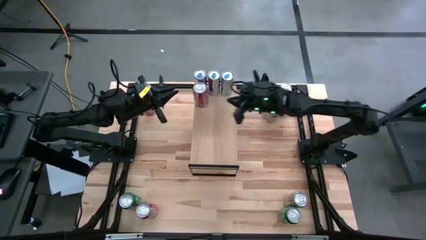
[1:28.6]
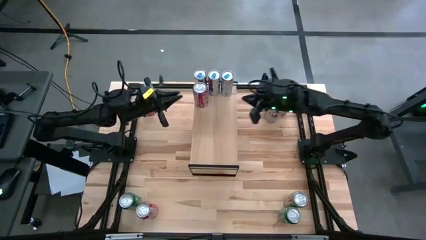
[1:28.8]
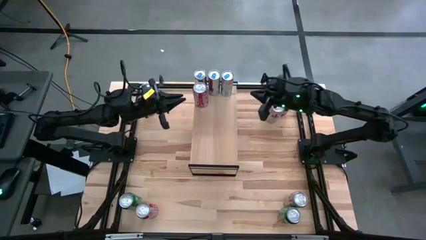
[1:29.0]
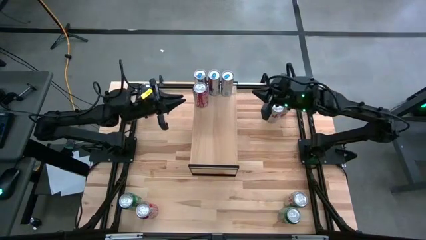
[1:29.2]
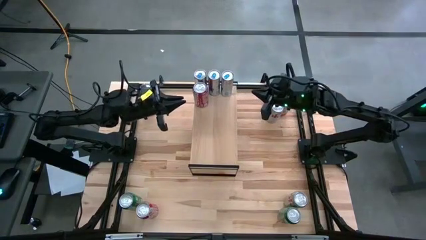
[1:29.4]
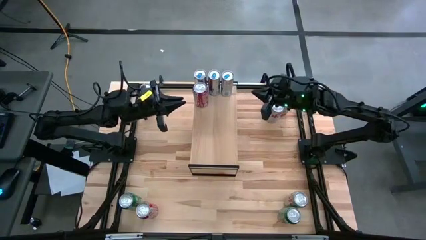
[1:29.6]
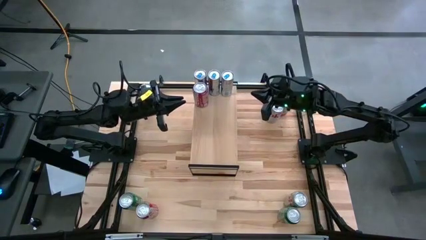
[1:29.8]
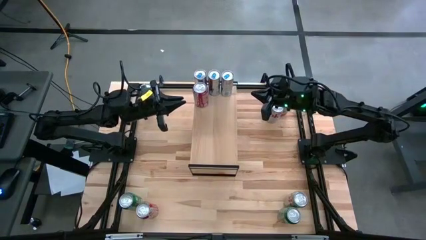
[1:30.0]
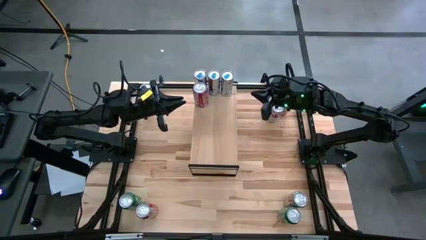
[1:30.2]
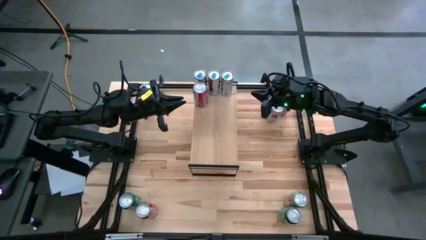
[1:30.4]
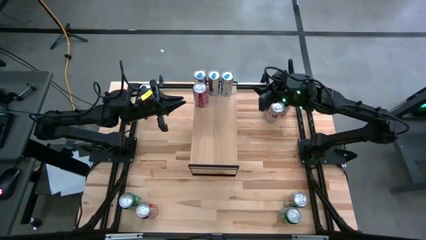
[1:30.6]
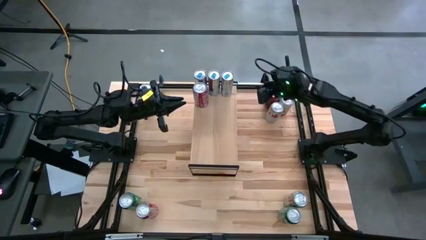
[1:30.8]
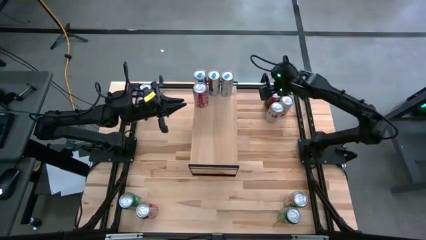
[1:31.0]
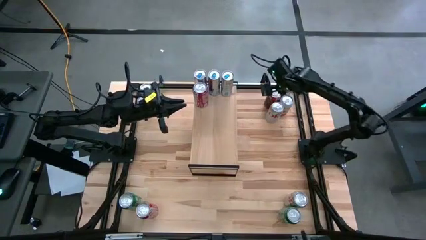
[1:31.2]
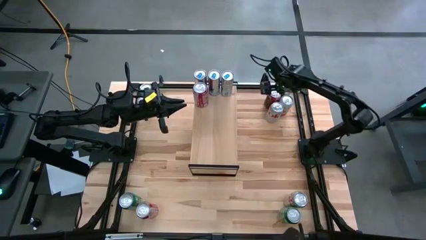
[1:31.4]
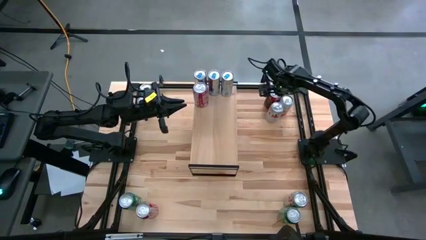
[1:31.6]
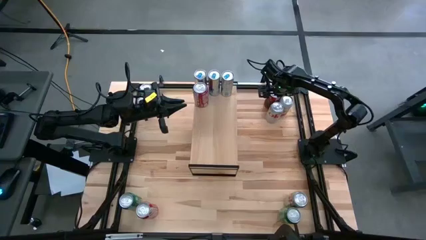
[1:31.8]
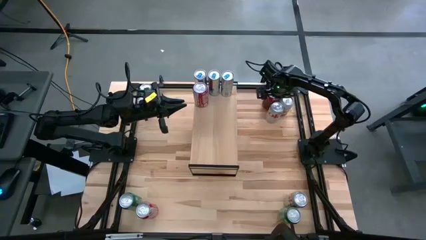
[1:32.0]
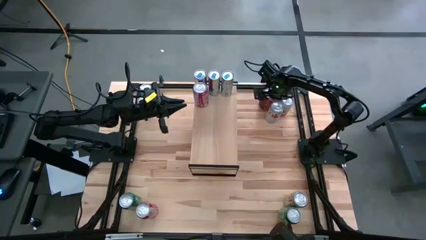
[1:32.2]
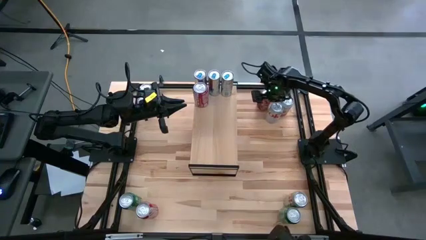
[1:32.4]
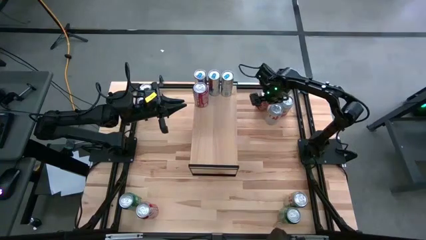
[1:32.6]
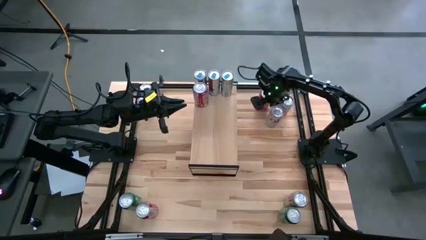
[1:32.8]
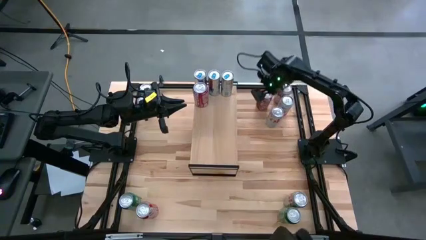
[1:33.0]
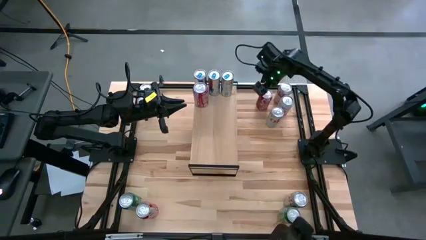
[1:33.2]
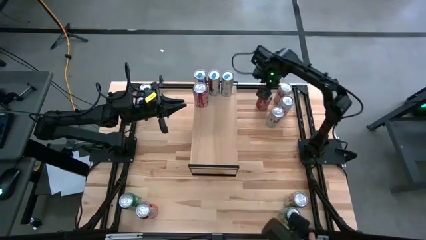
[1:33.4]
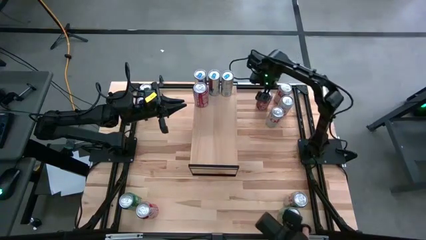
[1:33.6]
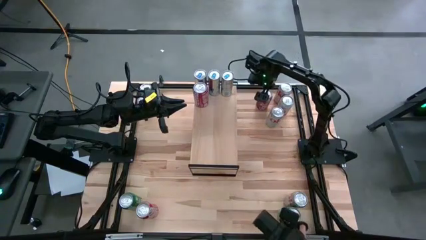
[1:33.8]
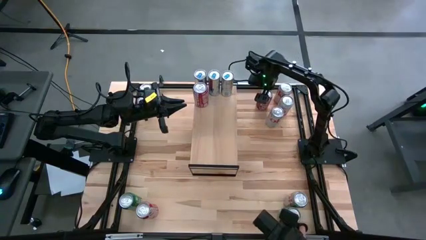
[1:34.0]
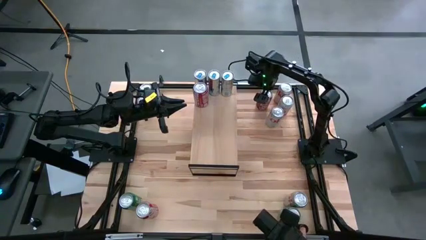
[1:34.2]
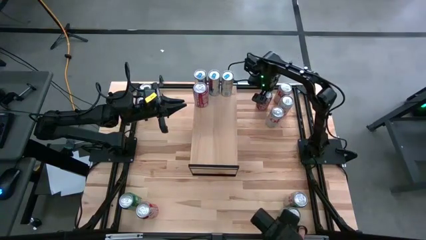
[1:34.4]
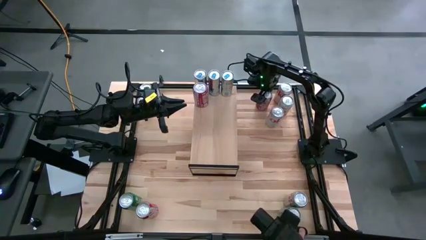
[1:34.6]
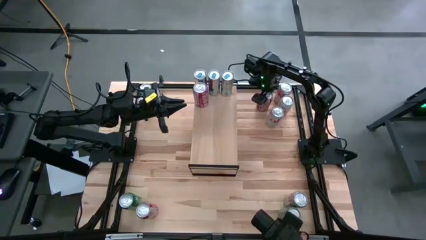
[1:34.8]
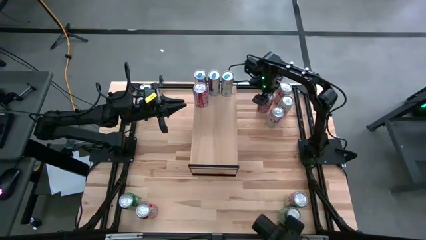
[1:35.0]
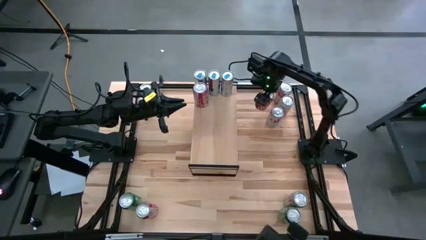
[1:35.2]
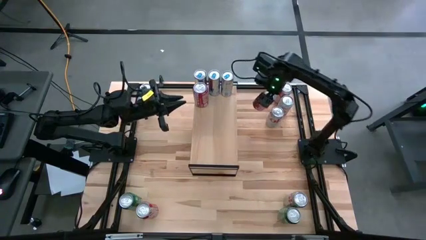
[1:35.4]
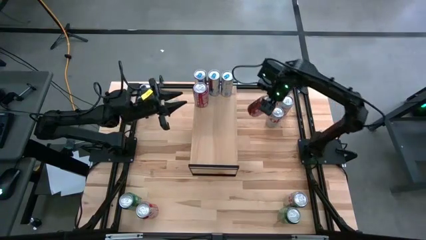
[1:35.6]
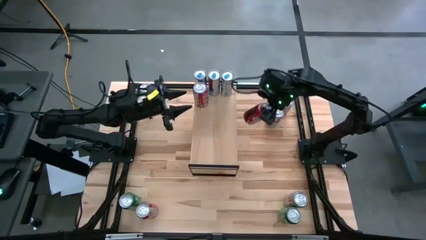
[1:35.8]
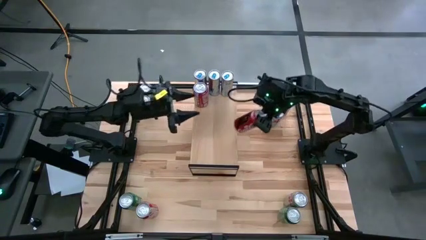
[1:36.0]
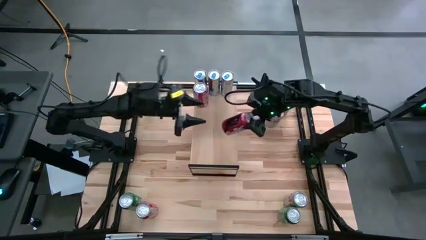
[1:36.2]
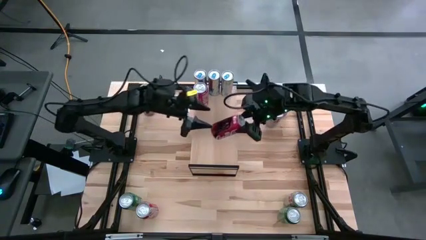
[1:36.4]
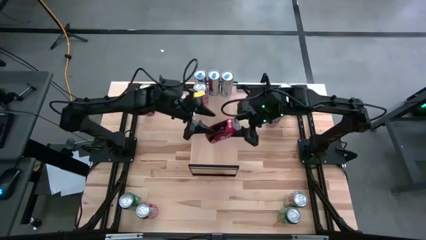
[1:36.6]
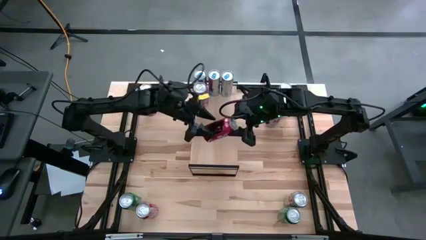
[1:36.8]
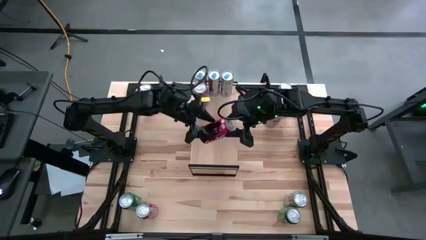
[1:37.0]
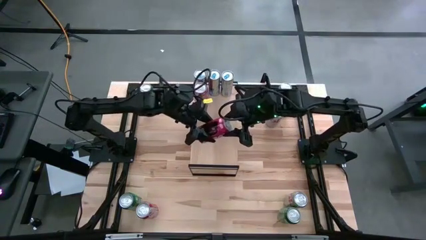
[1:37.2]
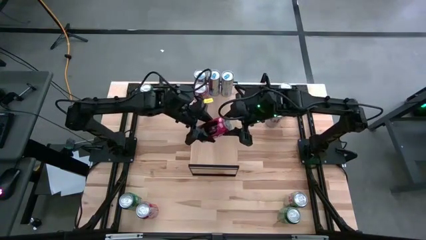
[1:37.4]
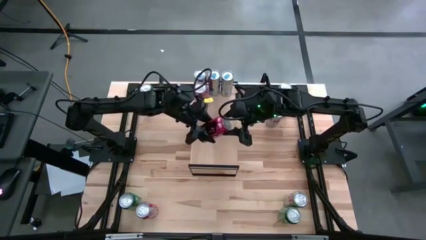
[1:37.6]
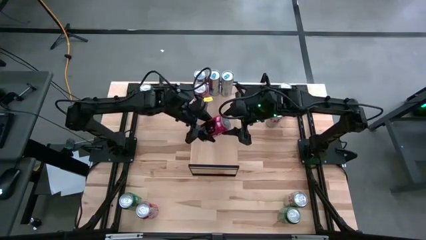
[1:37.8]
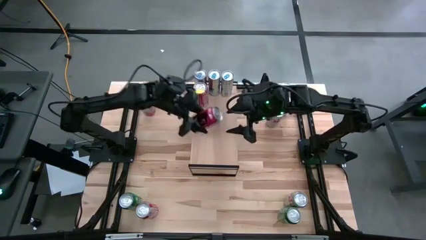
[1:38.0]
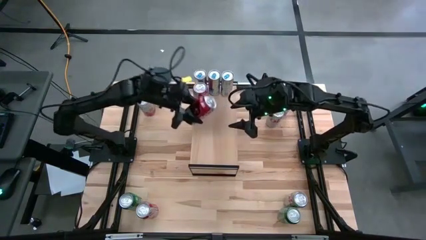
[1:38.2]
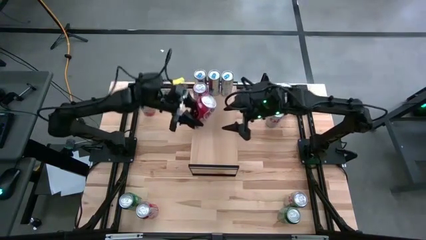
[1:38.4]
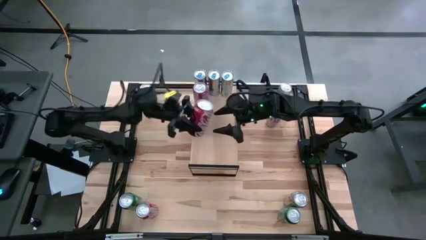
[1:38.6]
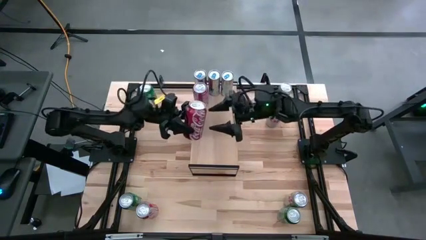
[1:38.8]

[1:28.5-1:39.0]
Task: Place canned beverage on shelf
Put the top red white soda can on the shelf
